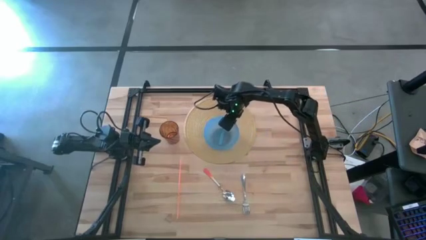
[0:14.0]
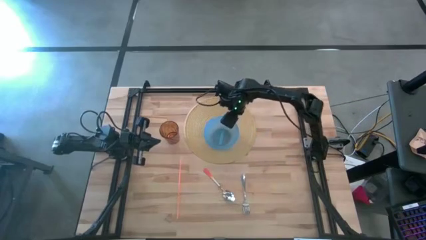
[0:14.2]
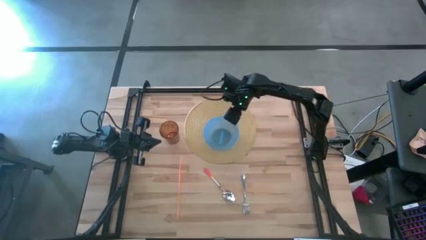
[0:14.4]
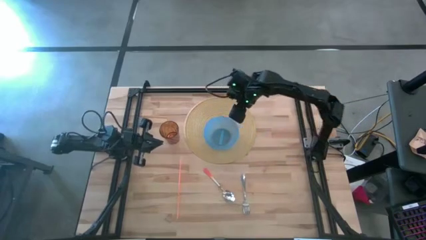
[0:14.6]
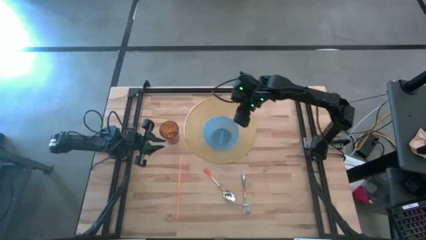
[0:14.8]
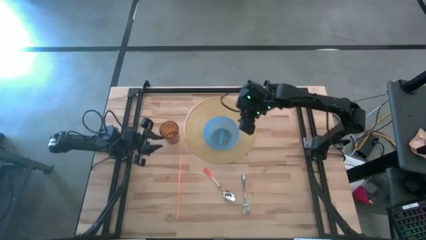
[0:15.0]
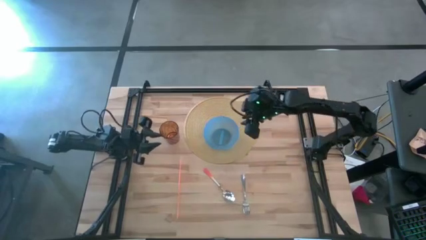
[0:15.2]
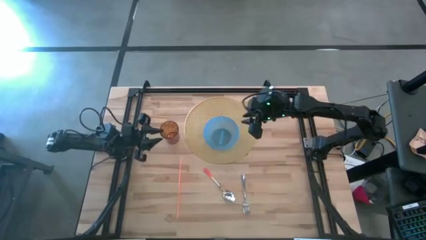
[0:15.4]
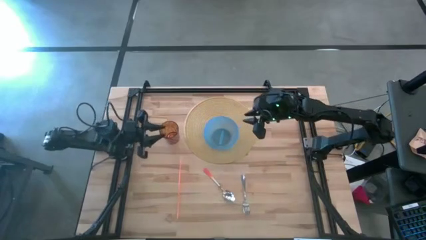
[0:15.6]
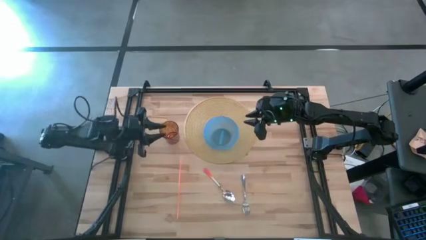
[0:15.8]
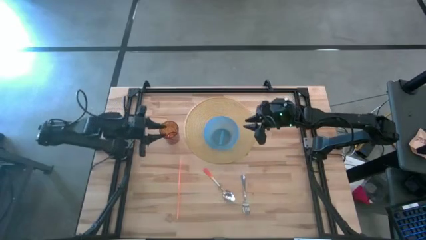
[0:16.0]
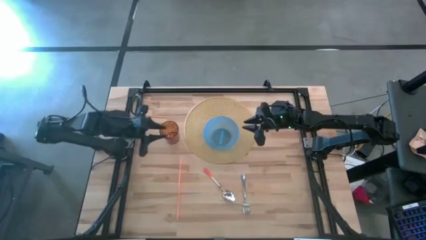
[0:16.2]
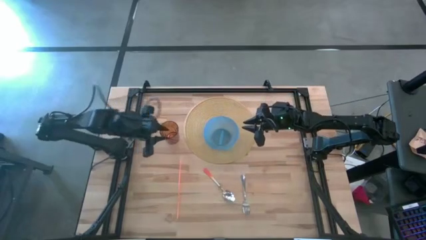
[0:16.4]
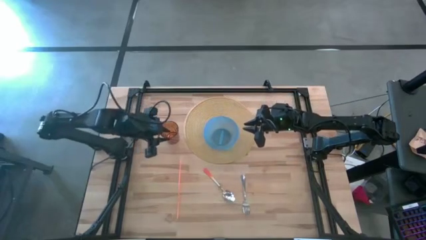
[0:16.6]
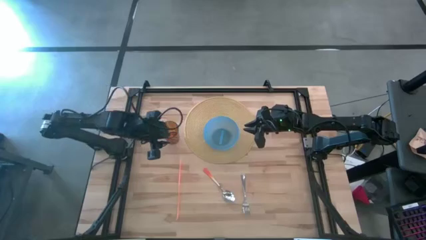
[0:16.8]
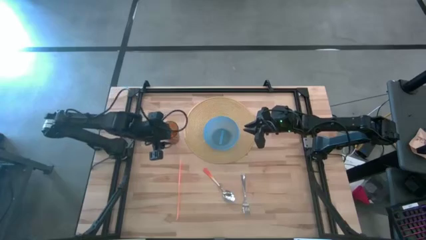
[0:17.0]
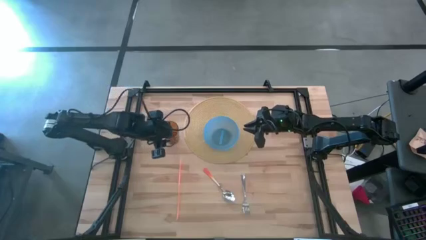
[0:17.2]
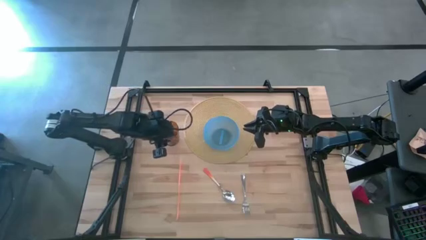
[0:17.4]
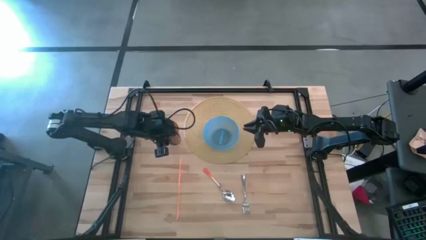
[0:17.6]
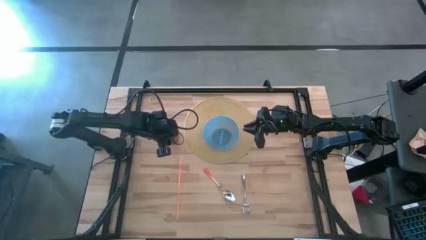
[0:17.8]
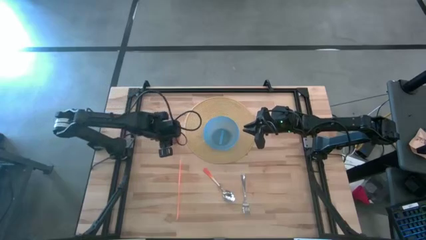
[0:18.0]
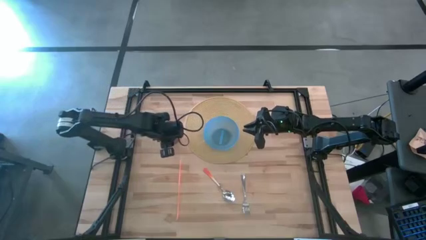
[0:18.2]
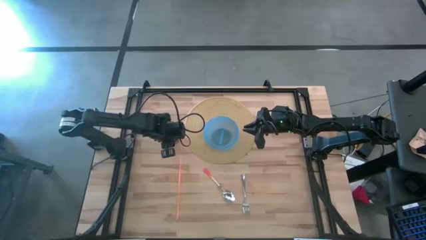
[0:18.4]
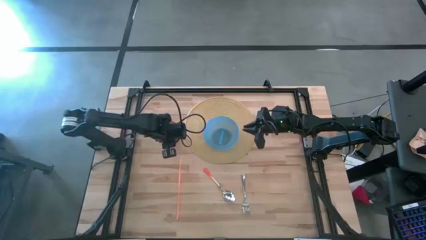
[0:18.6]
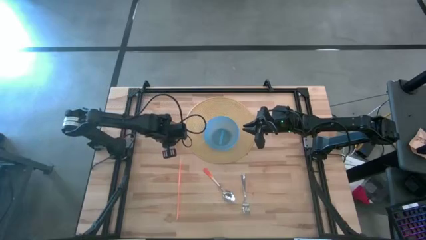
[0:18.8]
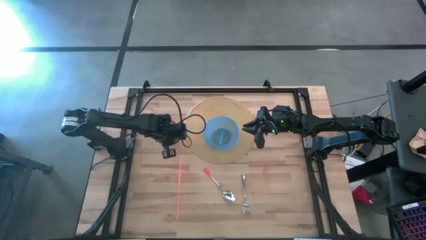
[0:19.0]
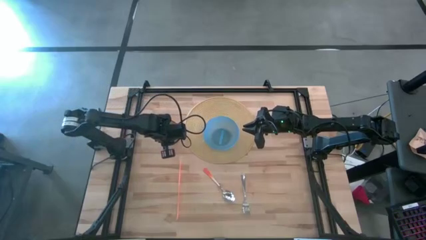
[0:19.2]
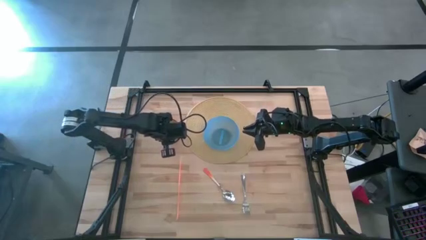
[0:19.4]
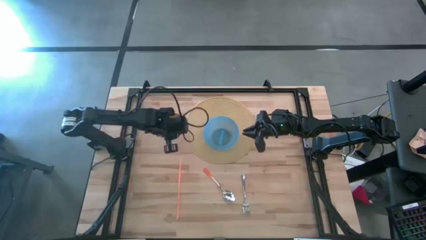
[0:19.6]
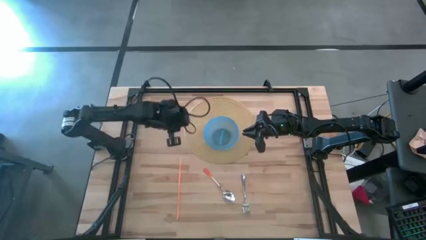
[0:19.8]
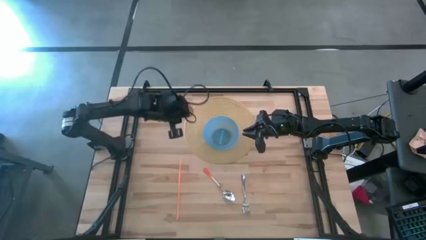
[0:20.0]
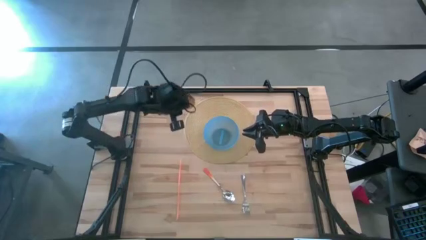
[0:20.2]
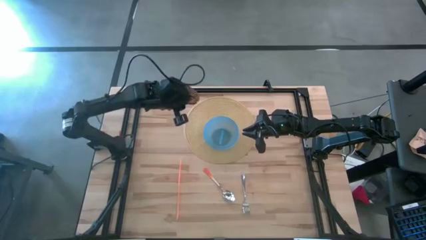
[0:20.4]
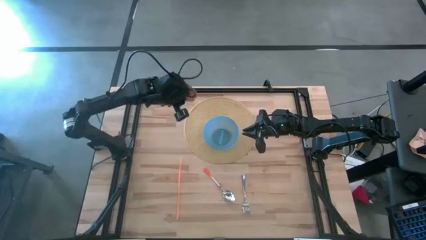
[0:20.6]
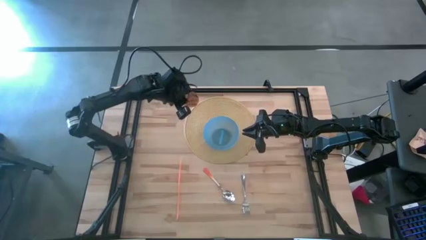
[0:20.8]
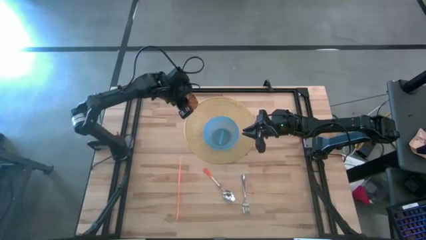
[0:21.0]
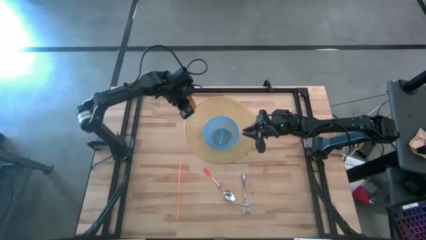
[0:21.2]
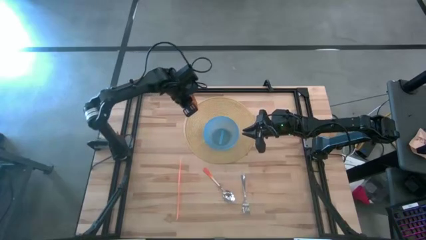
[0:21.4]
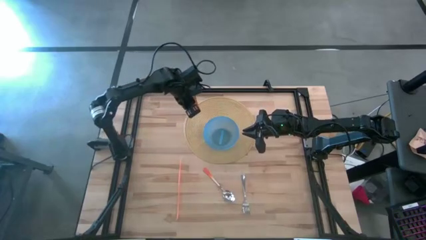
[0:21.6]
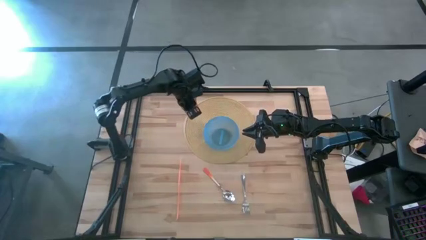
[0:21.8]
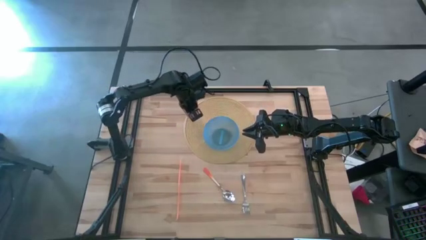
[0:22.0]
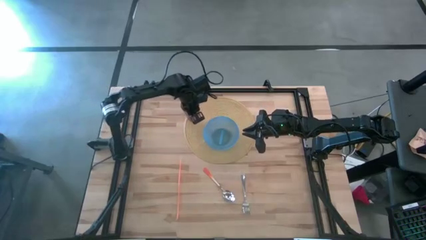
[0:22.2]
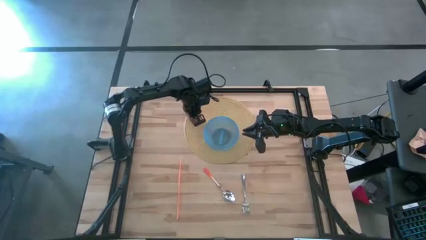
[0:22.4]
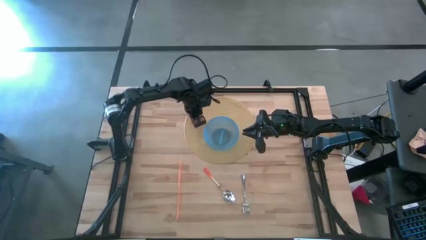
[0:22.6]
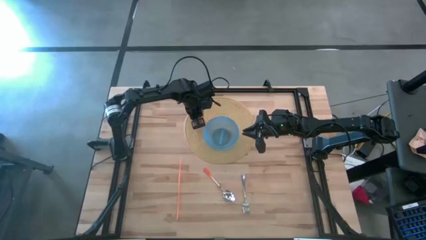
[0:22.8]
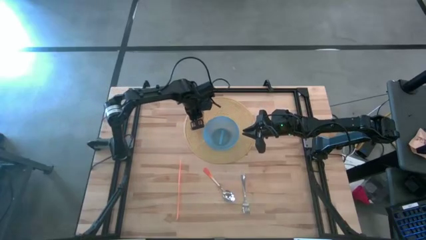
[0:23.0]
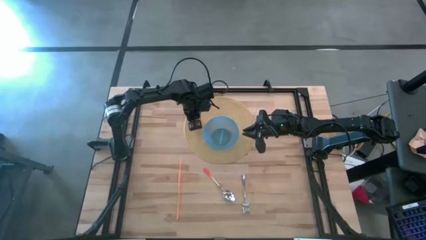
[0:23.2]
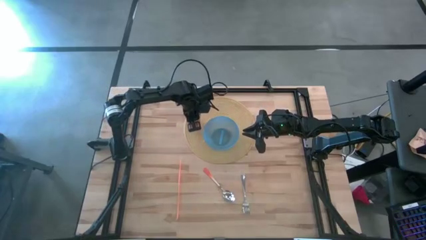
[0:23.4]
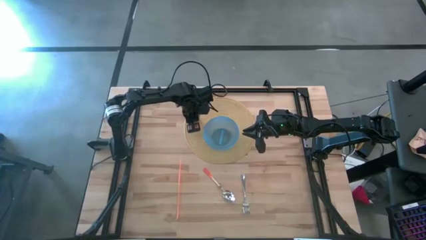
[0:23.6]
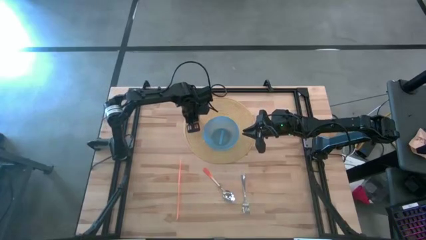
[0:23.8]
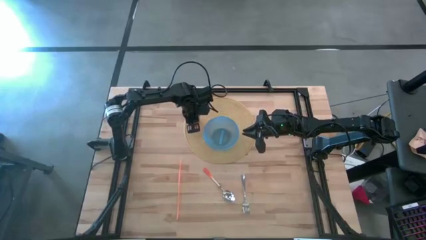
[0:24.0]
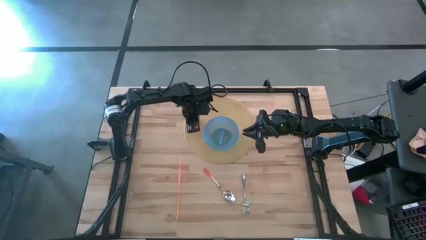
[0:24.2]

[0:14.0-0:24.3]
Task: Pick & Place Utensil
Put the brown cup on the top left of the brown mat

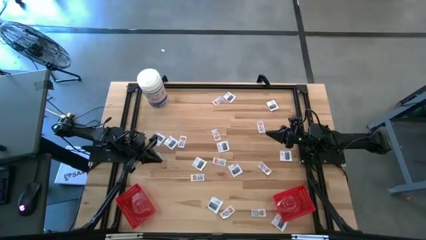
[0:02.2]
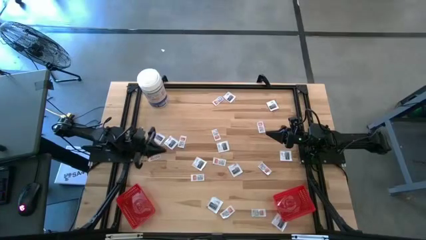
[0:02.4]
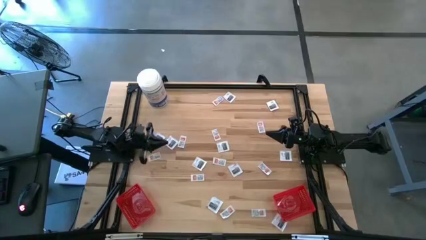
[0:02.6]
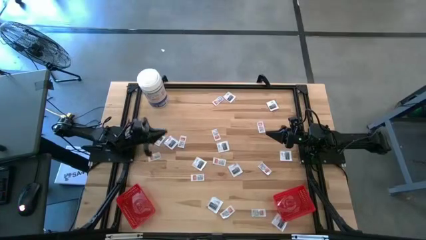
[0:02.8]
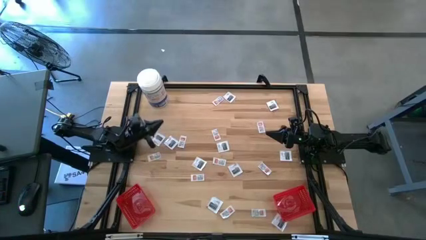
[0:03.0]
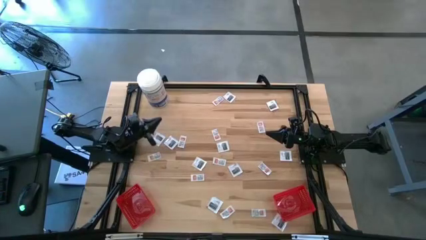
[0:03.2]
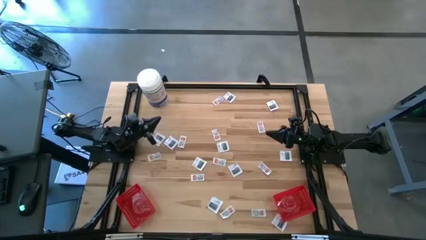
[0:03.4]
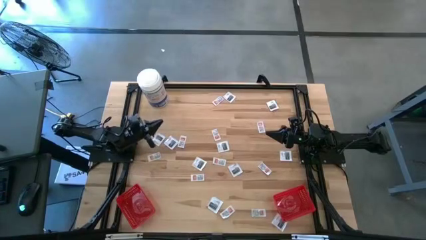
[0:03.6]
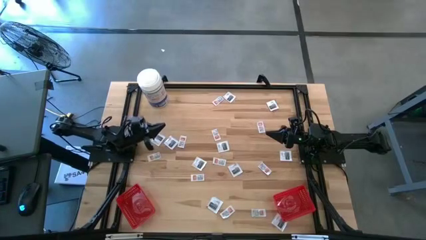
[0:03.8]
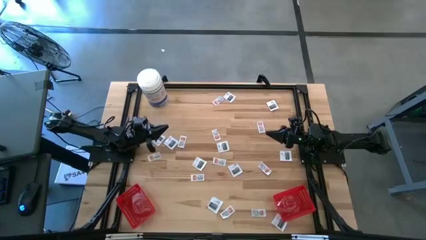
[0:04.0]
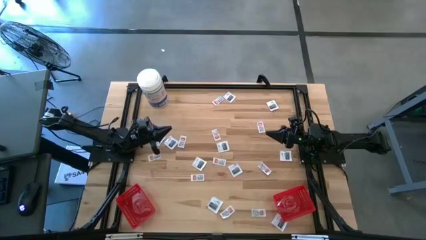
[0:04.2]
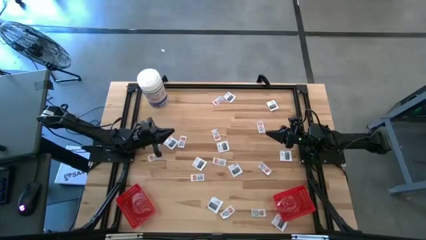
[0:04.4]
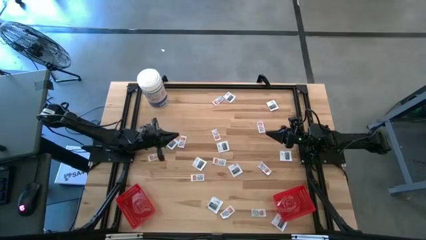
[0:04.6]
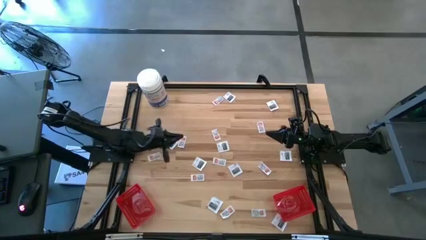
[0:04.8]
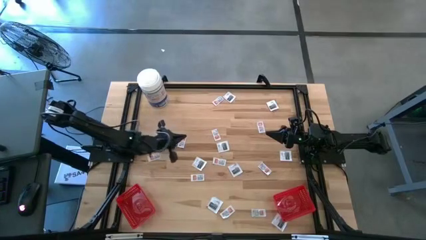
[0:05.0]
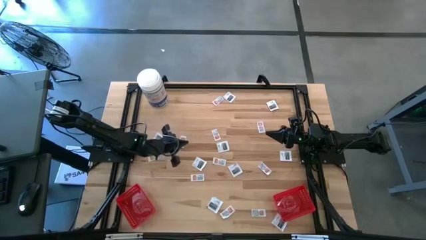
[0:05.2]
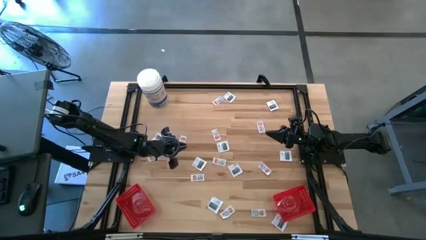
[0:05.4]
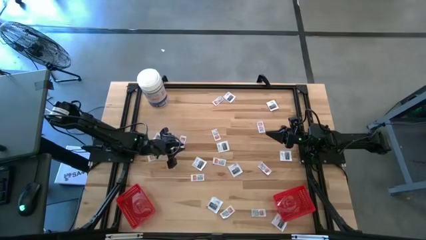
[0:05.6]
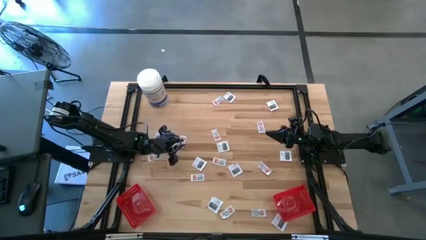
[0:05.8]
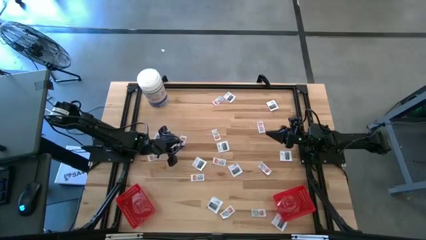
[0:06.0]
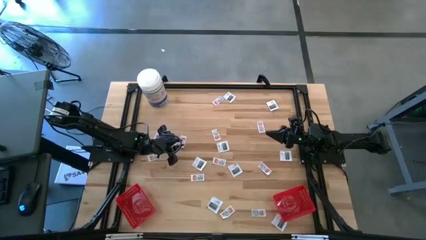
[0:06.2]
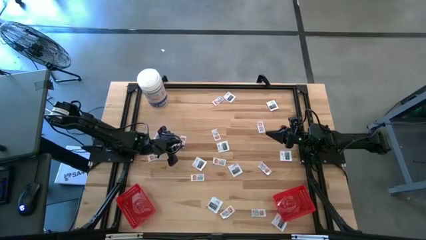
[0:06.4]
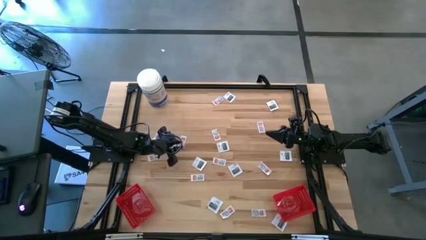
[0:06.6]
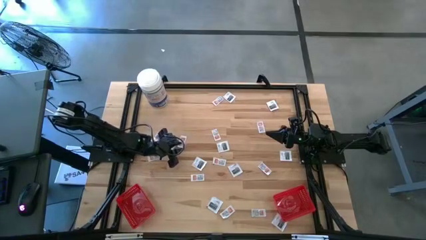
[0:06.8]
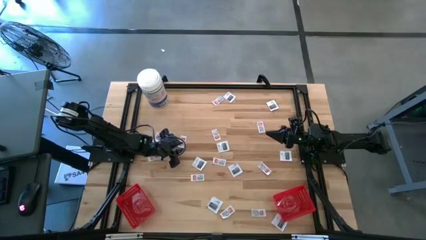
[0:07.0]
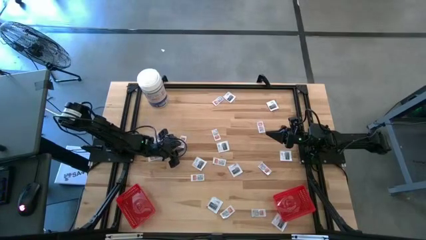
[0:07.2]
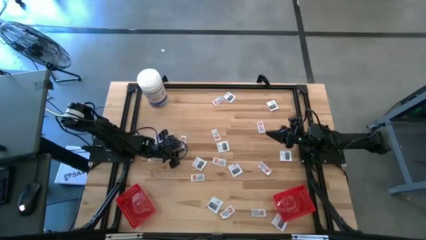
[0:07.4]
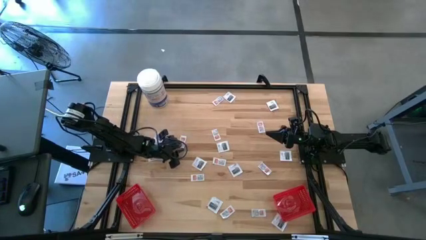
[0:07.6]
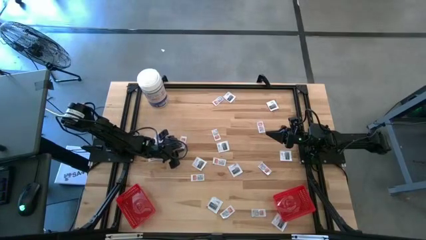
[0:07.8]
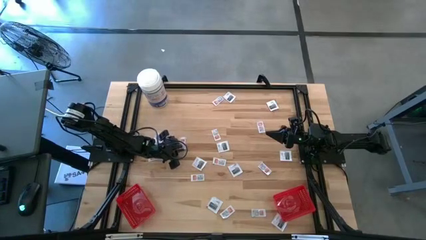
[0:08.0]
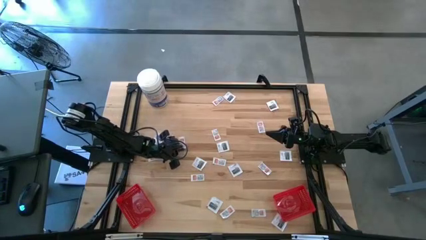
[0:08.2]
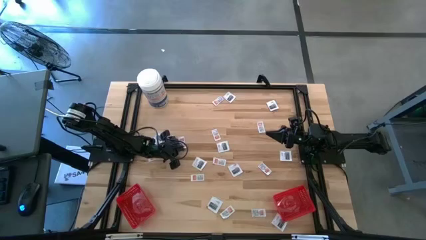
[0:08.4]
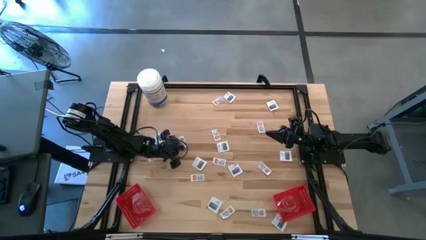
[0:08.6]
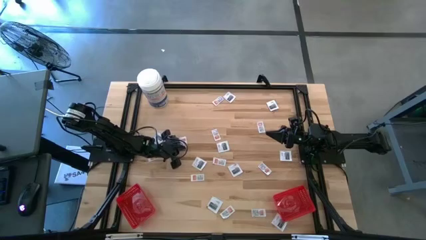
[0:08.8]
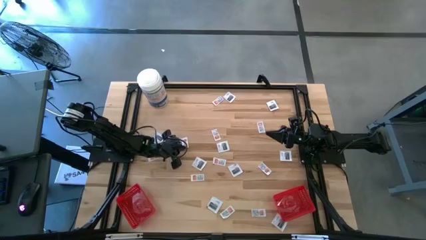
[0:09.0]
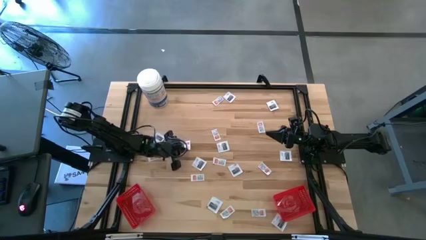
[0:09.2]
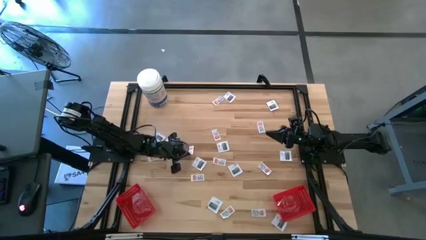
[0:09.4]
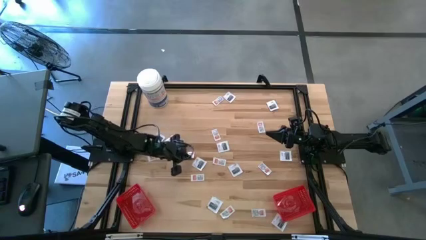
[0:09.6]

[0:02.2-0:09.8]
Task: Pick & Place First Aid Supplies
Put the ointment pack into the left red bin
